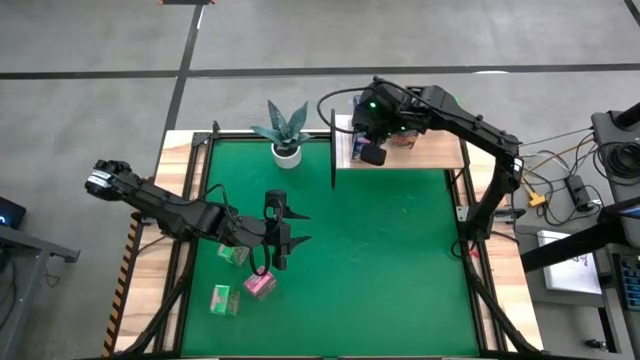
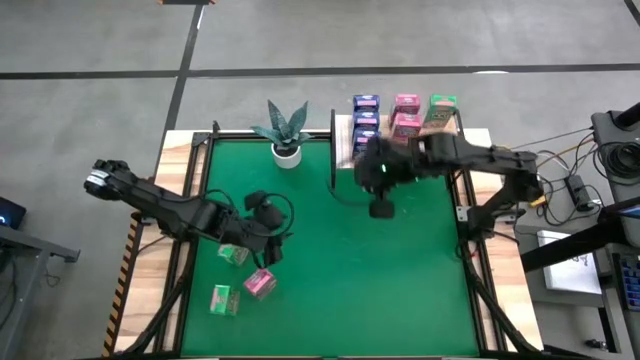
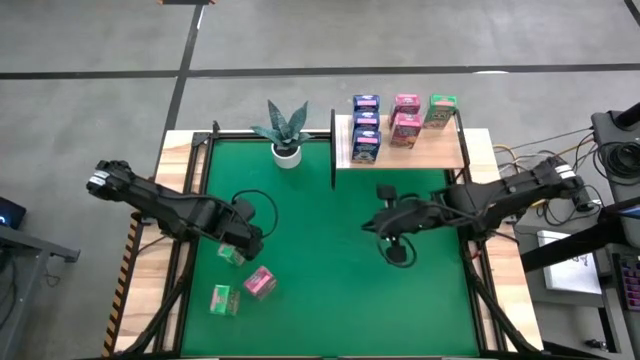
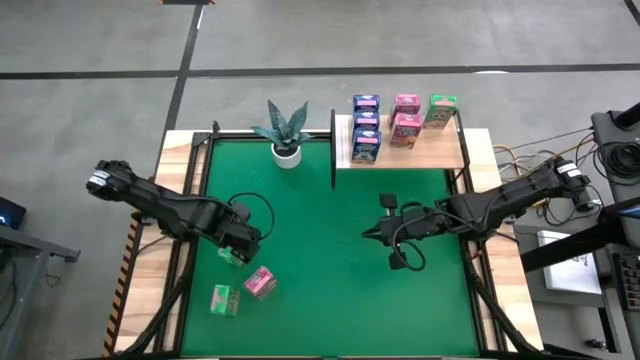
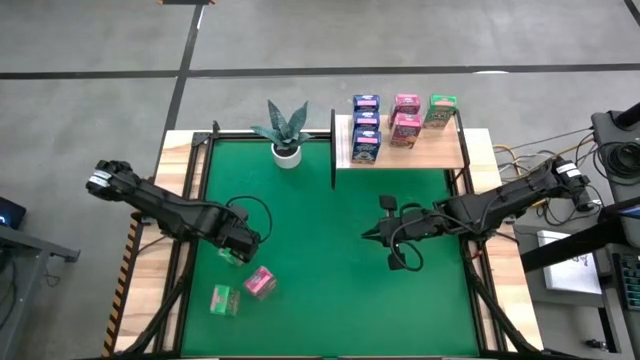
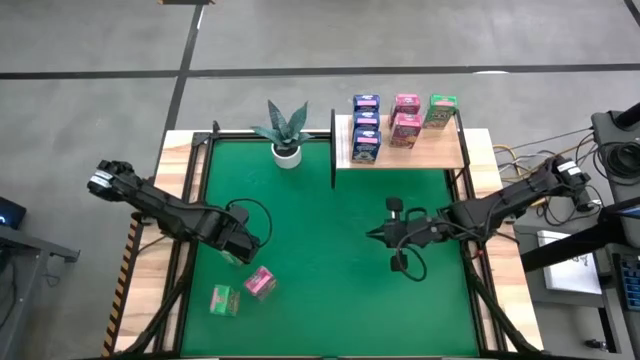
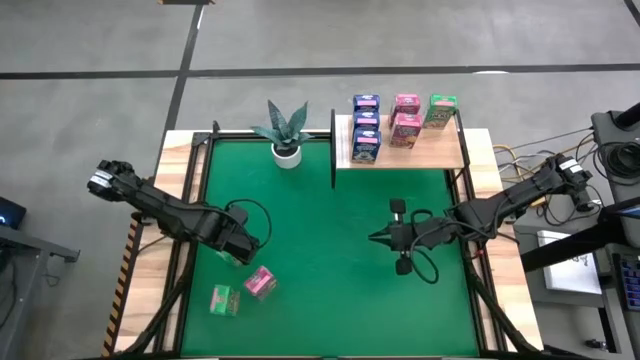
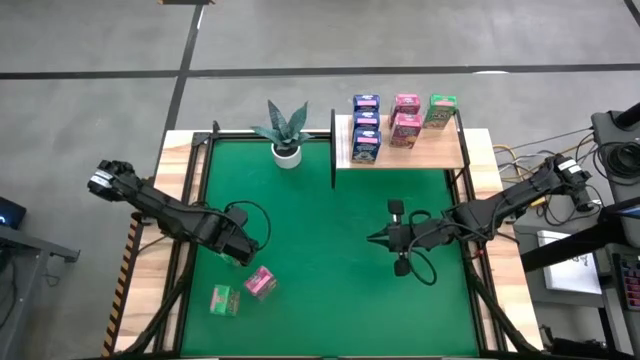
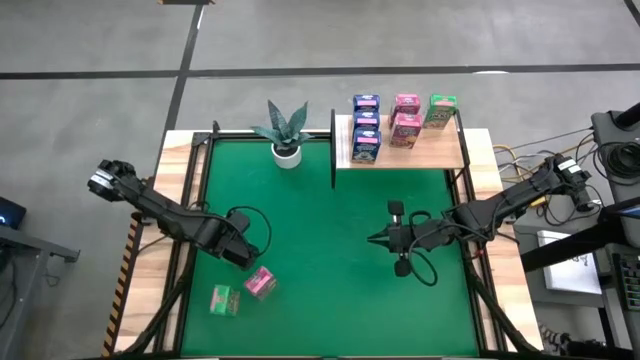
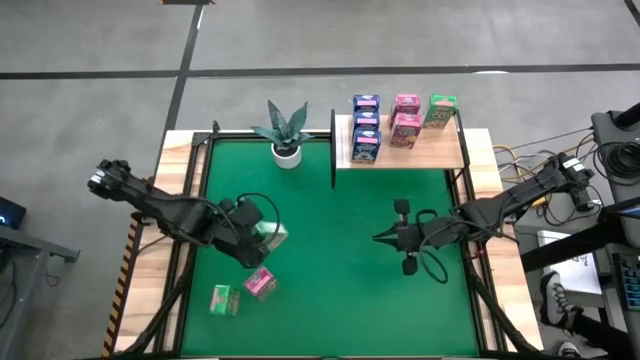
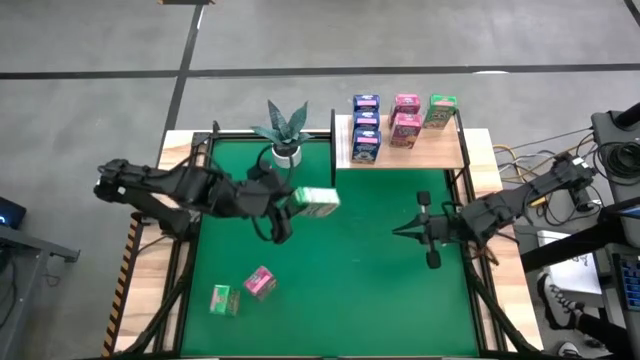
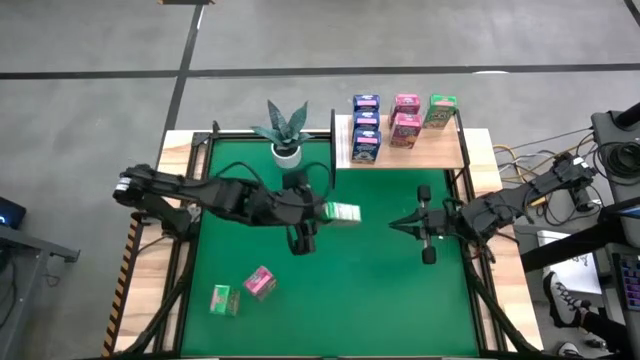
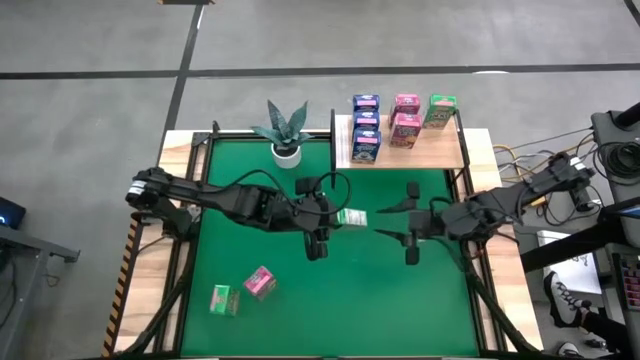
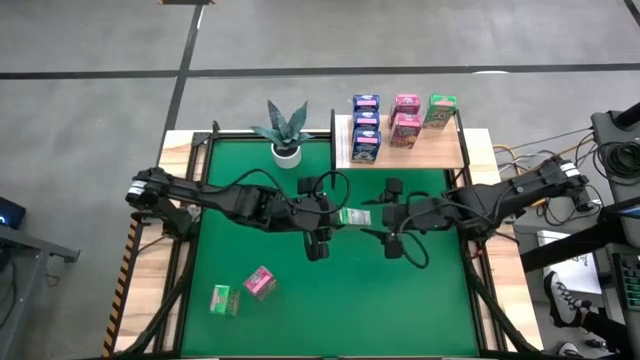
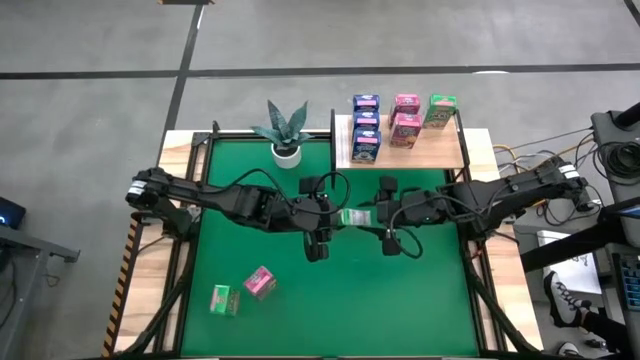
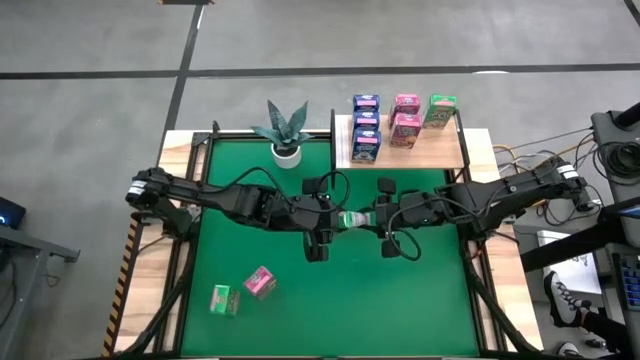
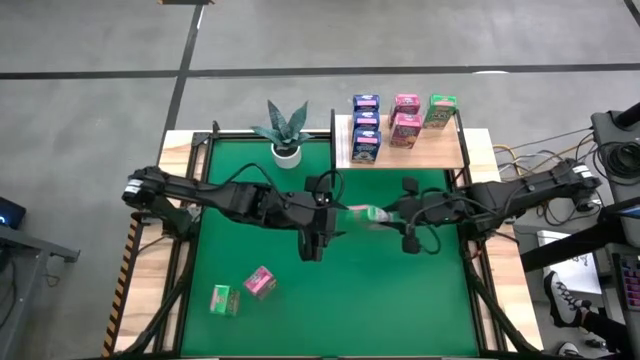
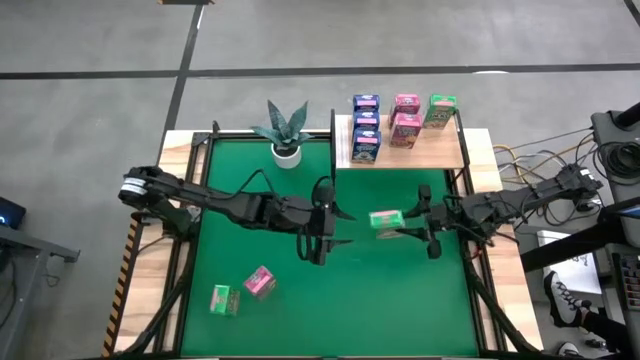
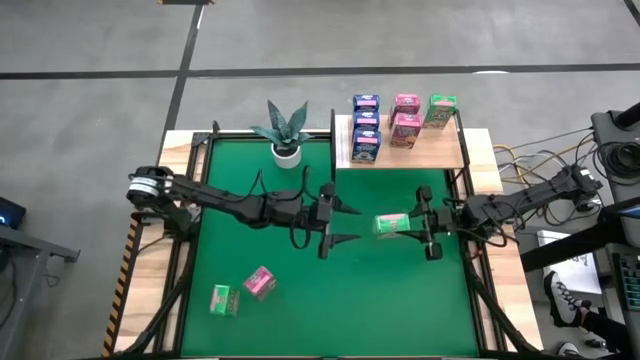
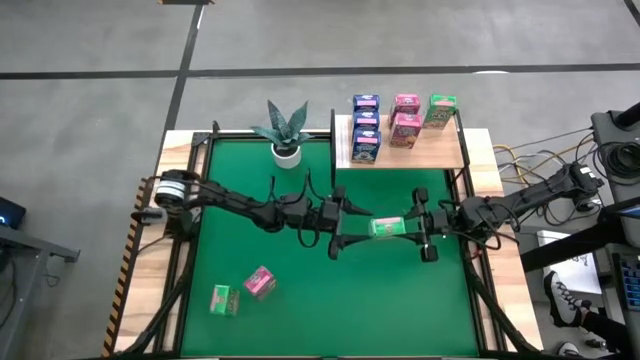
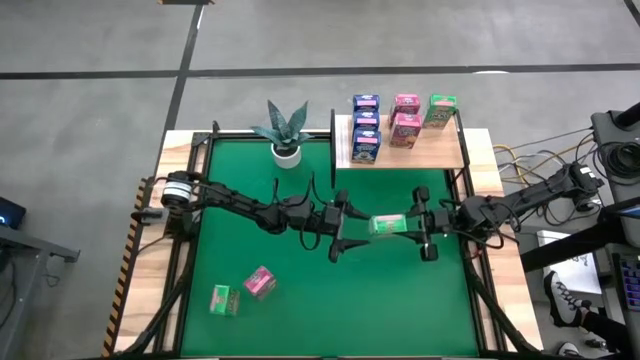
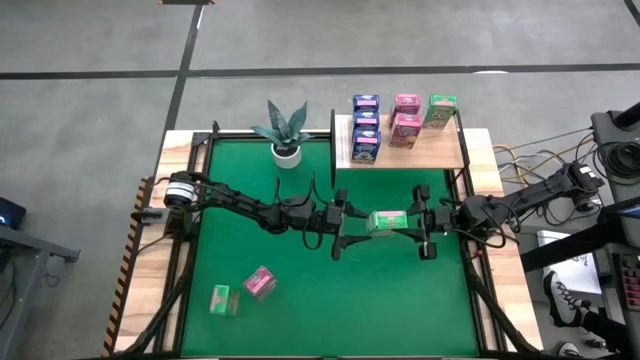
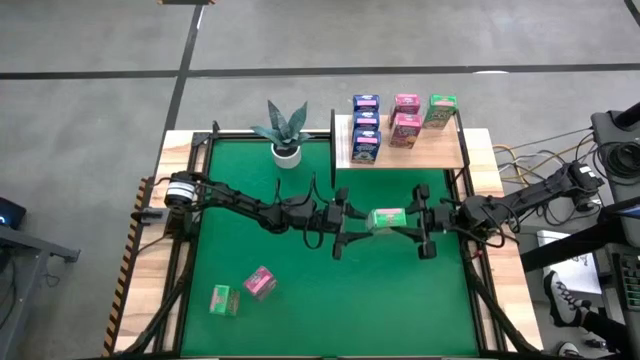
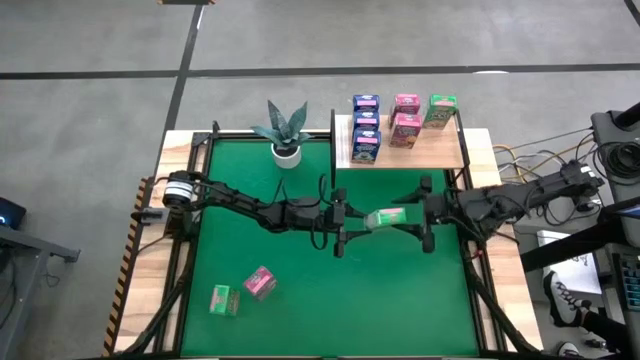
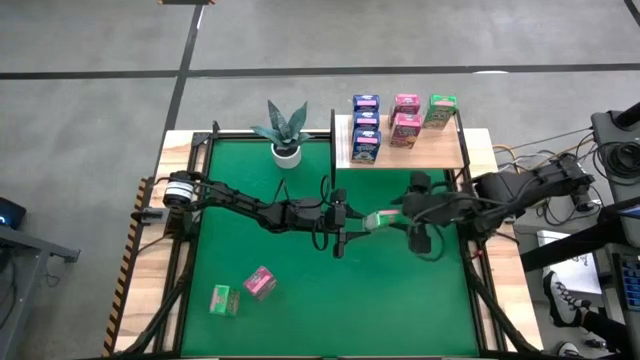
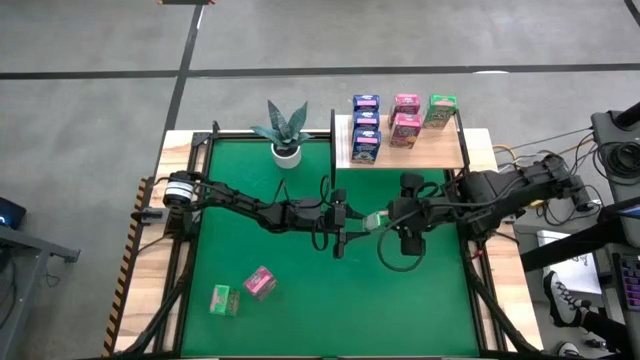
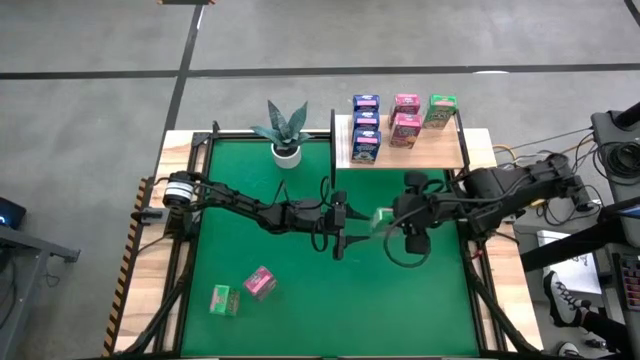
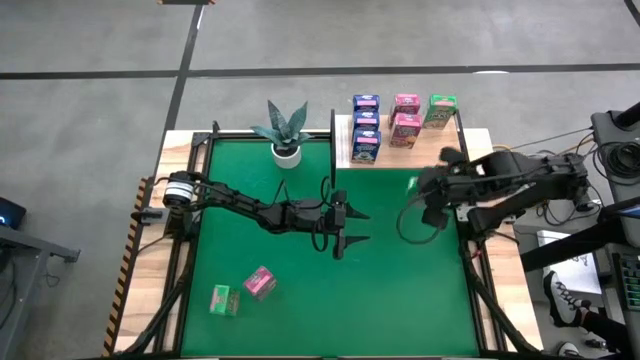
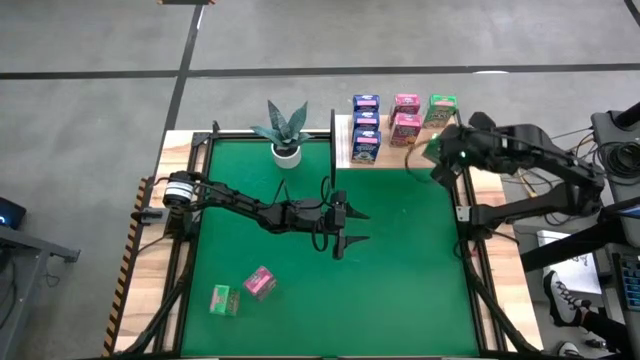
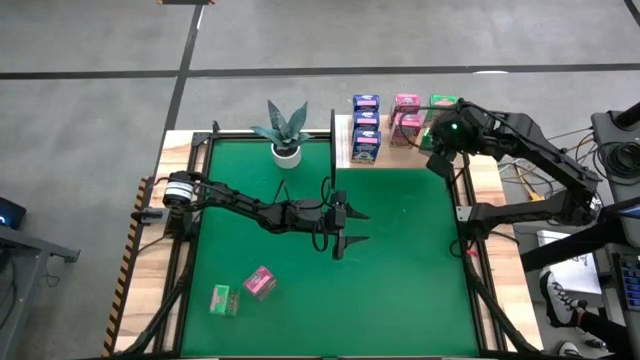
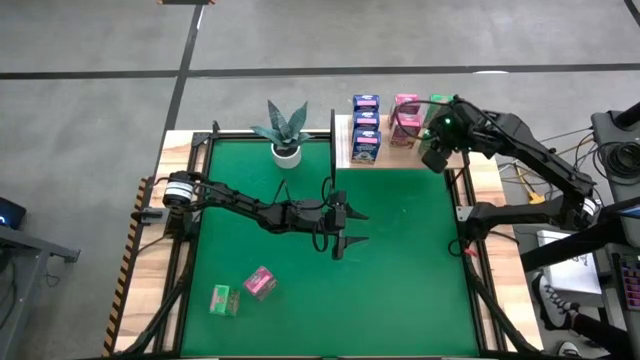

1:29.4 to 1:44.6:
Task: Stack cereal on shelf
Put the top green cereal box on the shelf aligned with the other green cereal boxes

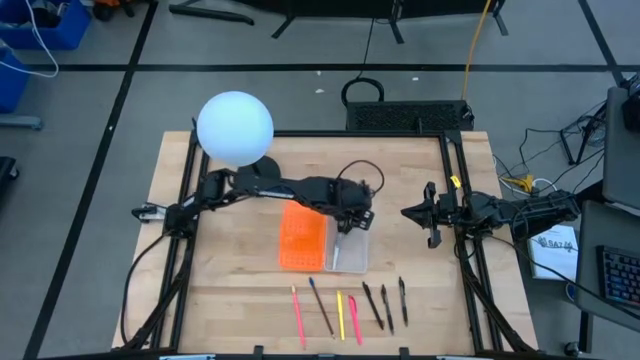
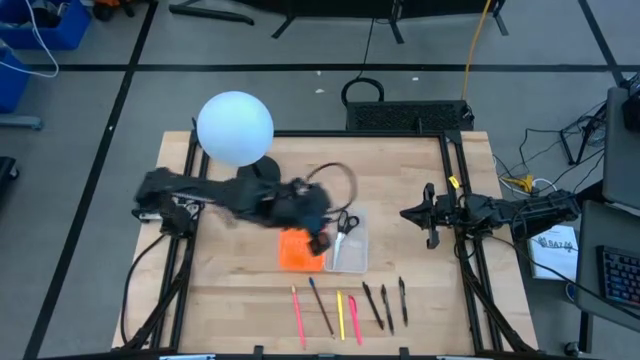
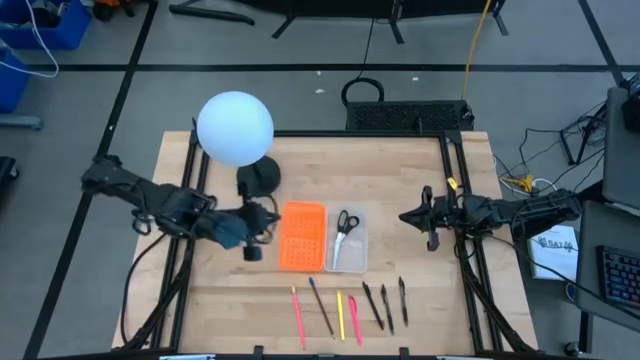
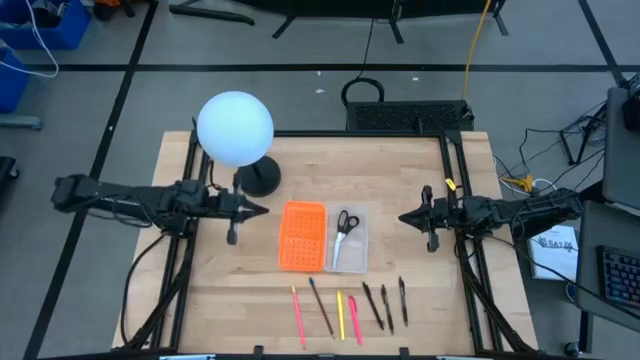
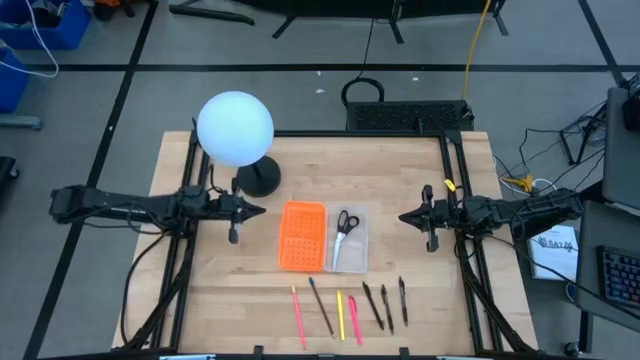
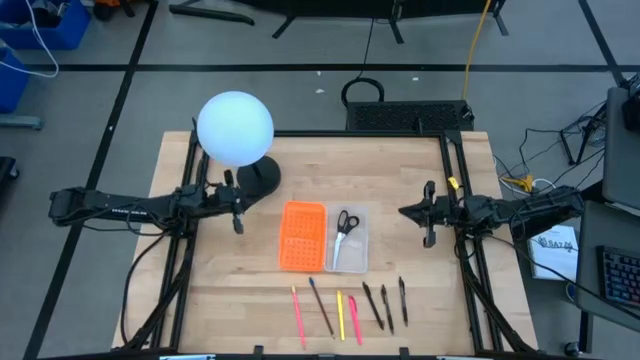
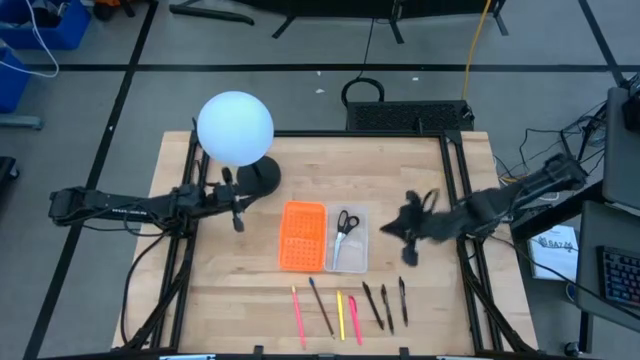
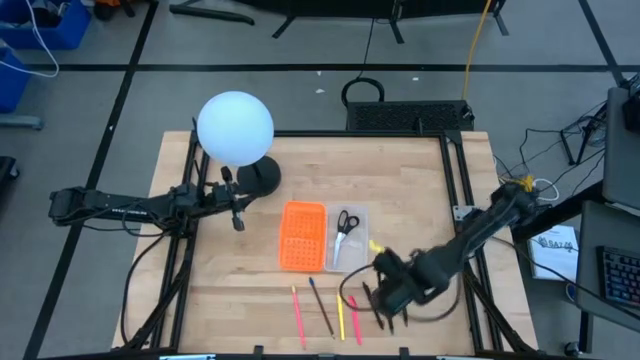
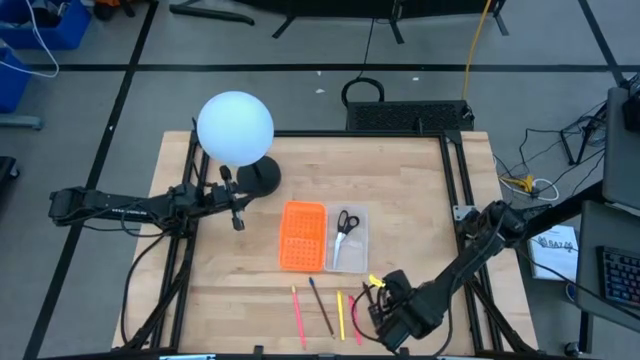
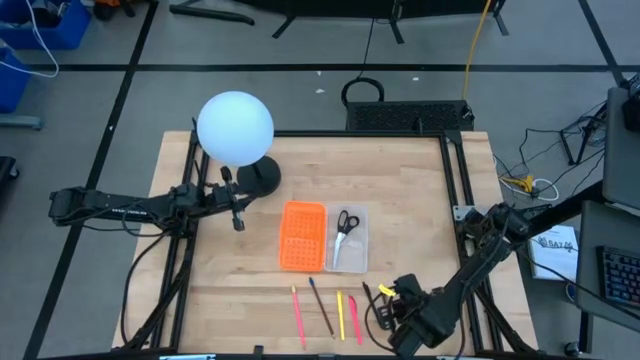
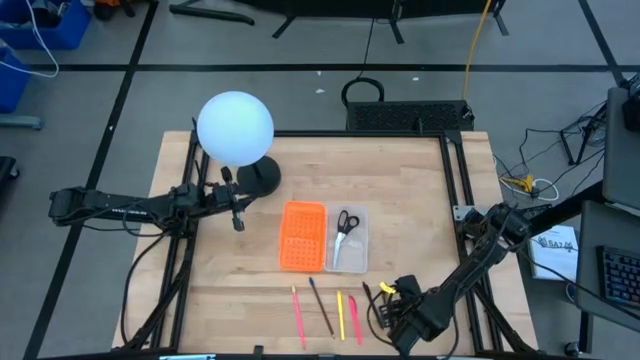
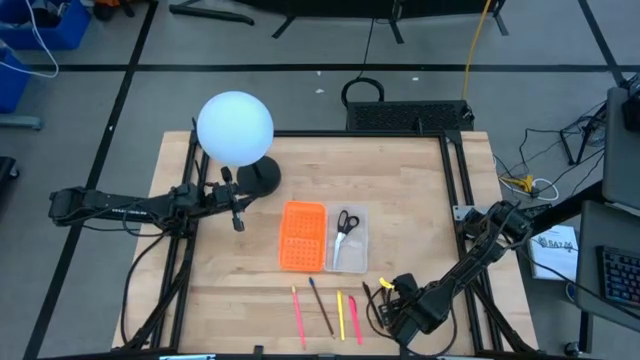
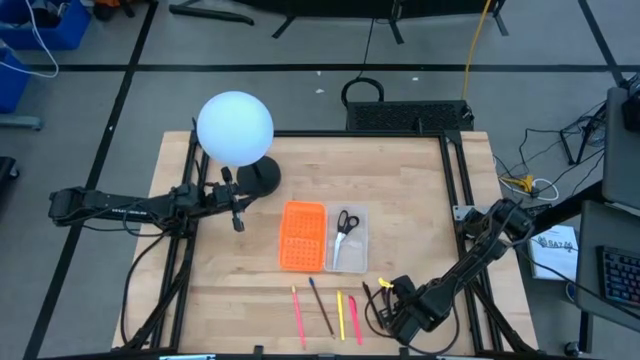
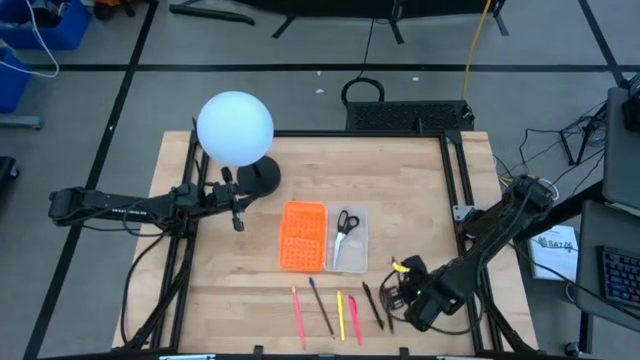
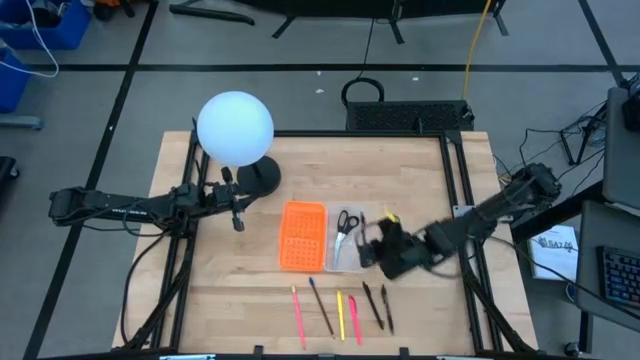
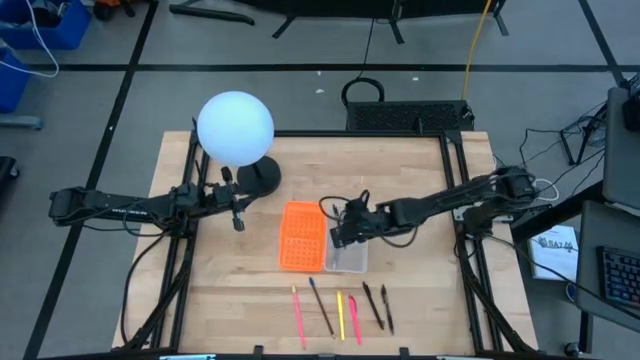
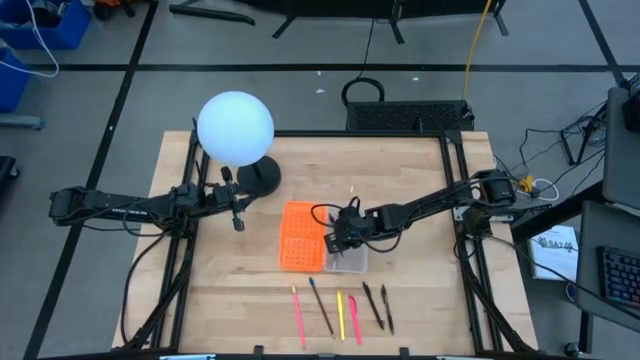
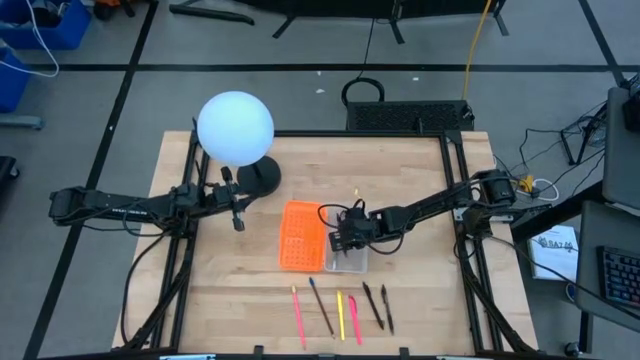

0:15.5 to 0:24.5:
Task: Pick & place school supplies into a supply box
Put the right black pen into the orange supply box
